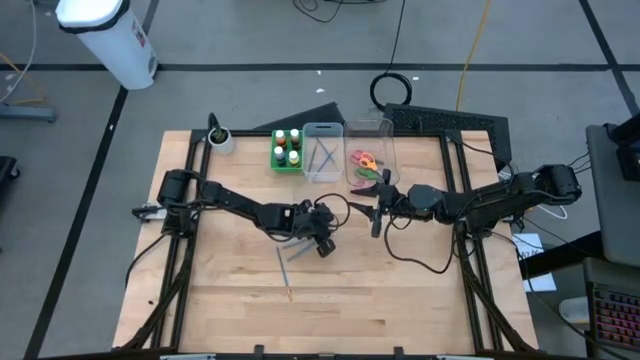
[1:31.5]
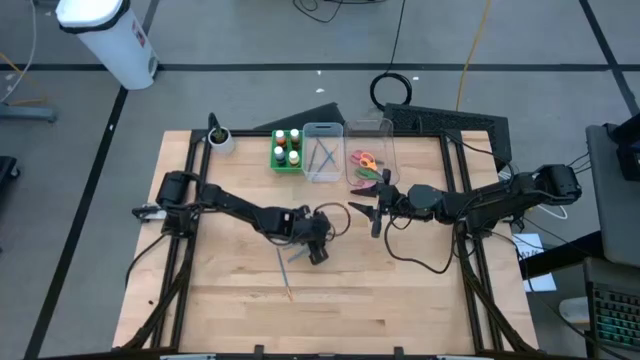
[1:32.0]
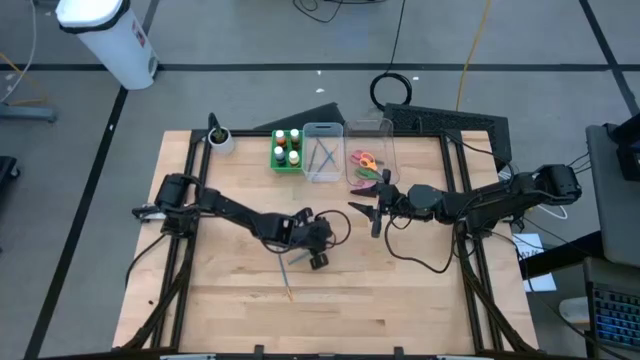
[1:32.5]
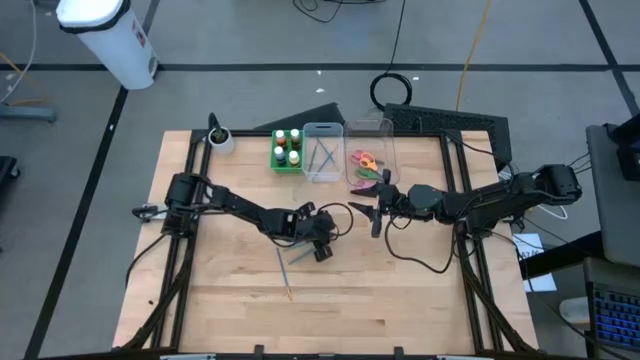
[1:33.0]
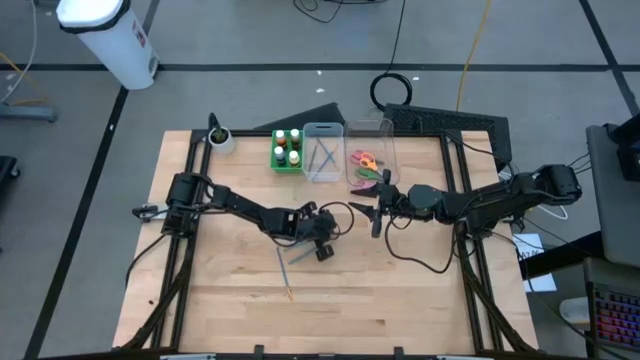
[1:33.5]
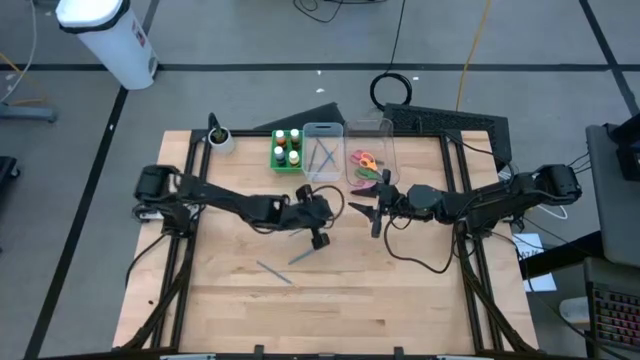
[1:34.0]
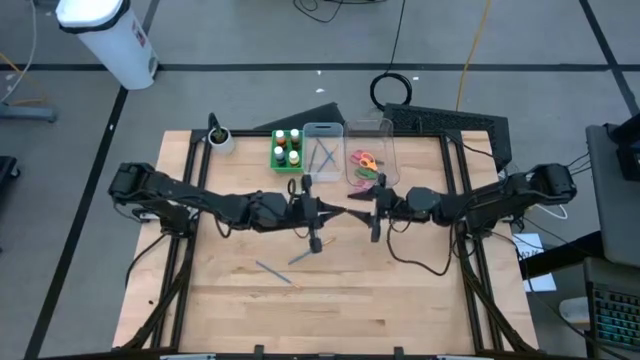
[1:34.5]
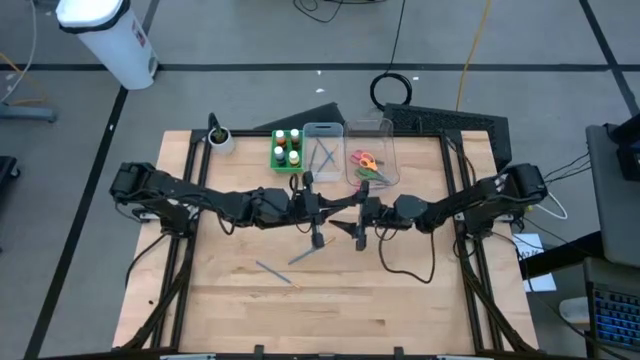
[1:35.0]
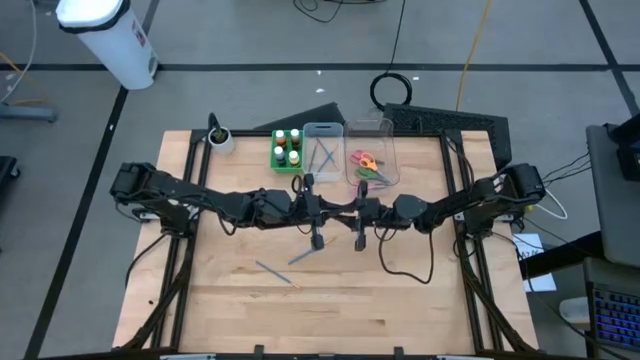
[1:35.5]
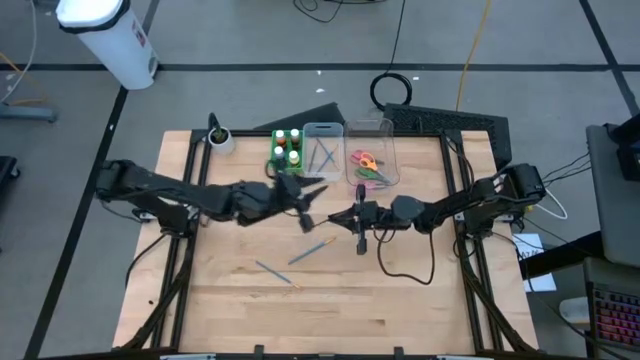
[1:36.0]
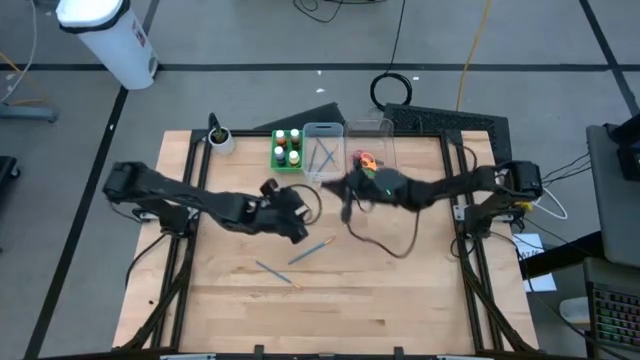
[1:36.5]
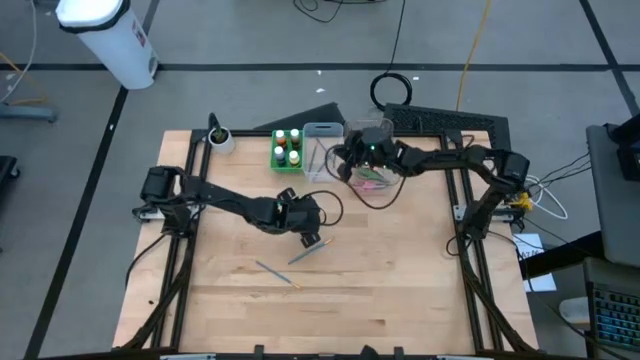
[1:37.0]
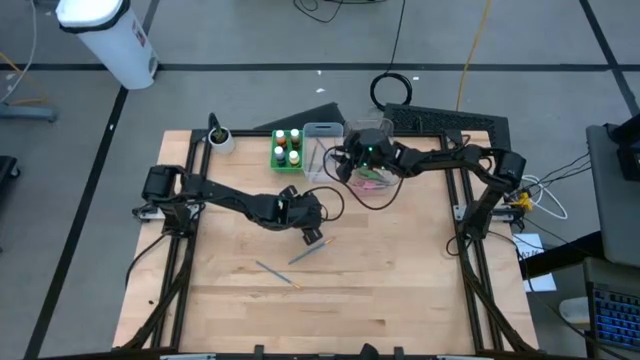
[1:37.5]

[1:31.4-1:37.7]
Task: Pick & Place Paint Supplies
Put the blue paint brush into the white bin

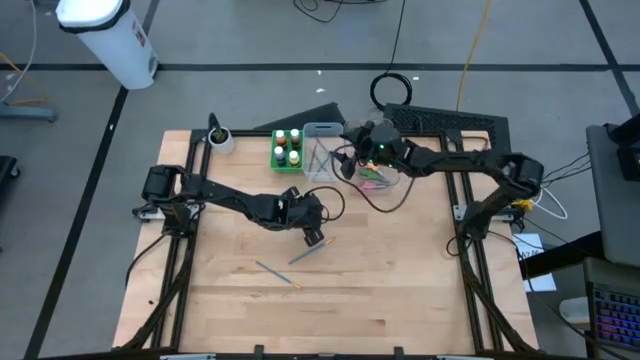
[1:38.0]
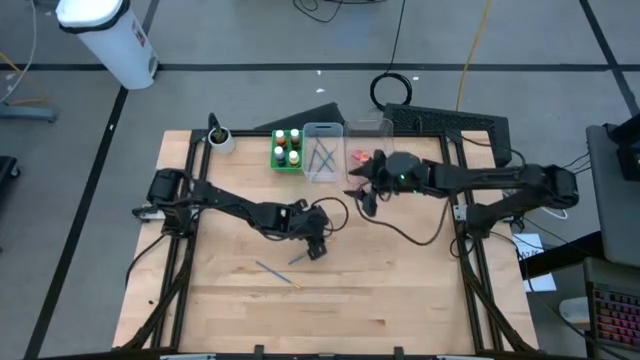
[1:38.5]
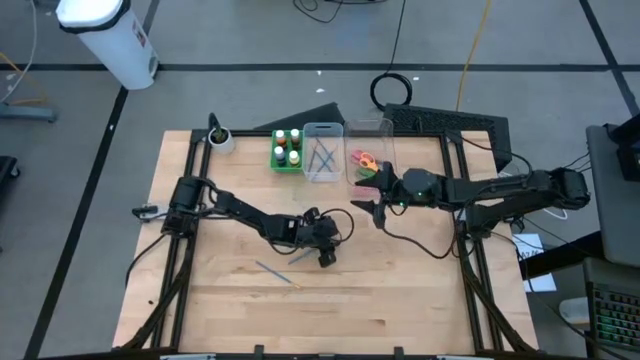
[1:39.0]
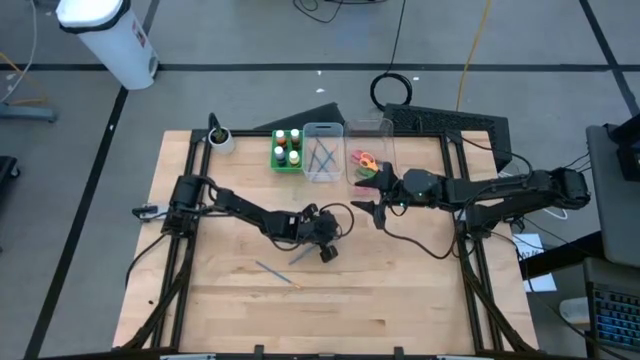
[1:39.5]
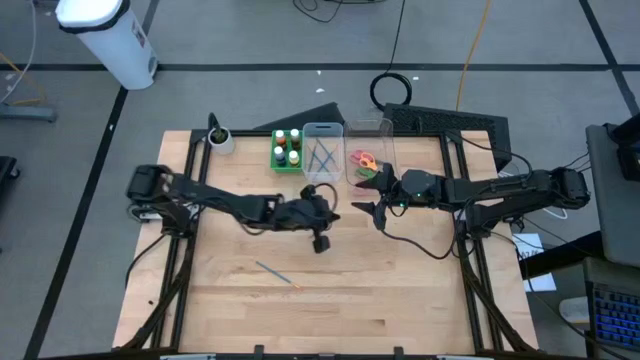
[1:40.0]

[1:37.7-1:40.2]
Put the blue paint brush into the white bin

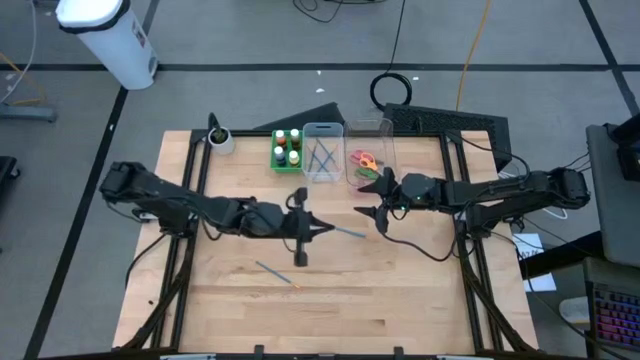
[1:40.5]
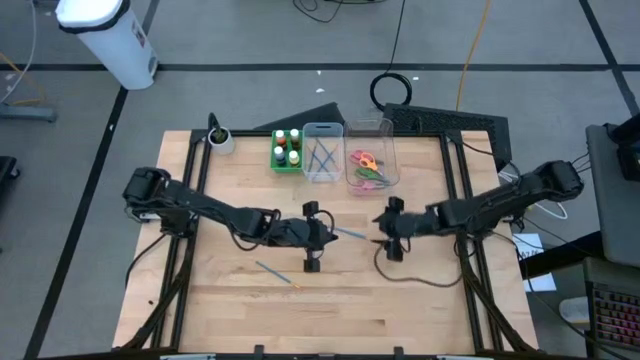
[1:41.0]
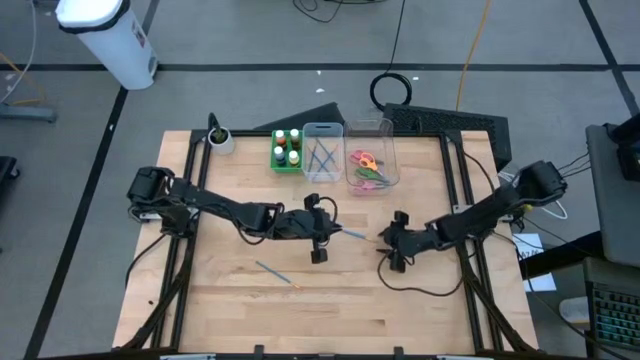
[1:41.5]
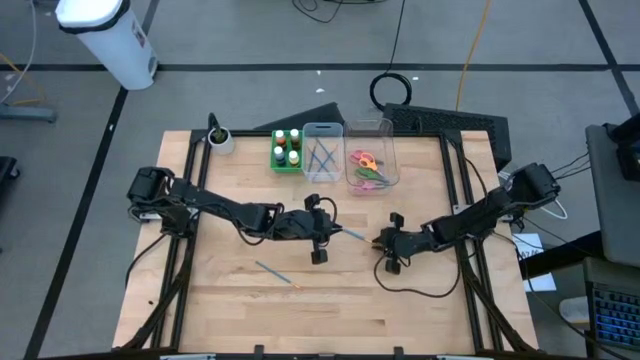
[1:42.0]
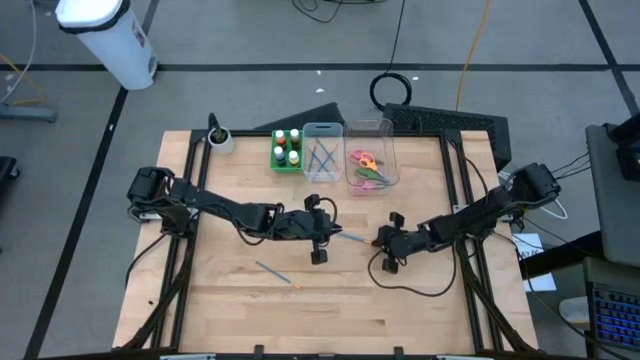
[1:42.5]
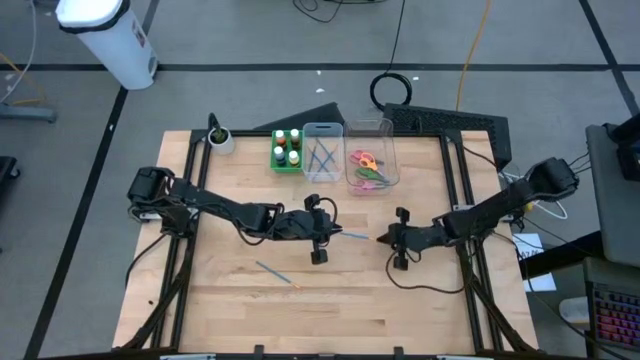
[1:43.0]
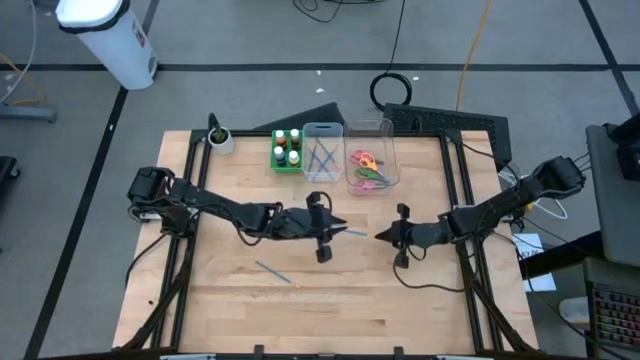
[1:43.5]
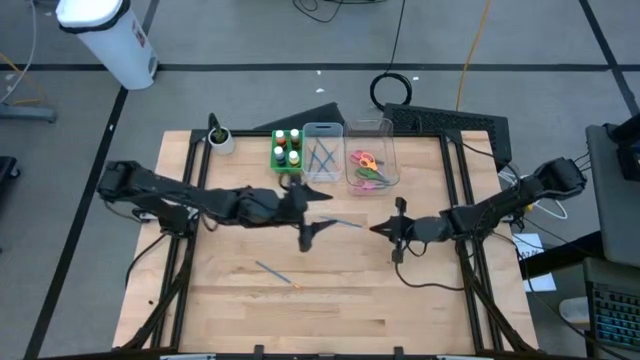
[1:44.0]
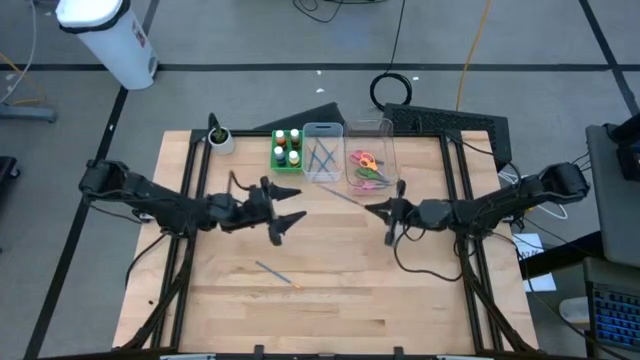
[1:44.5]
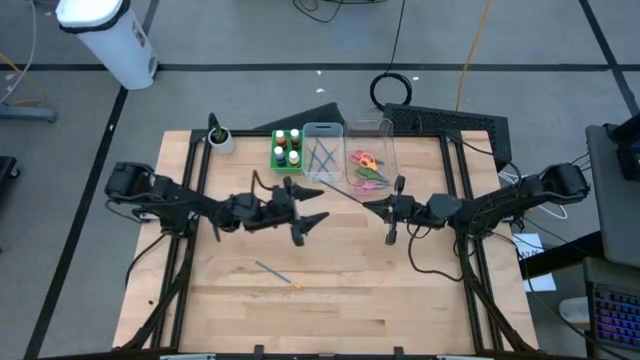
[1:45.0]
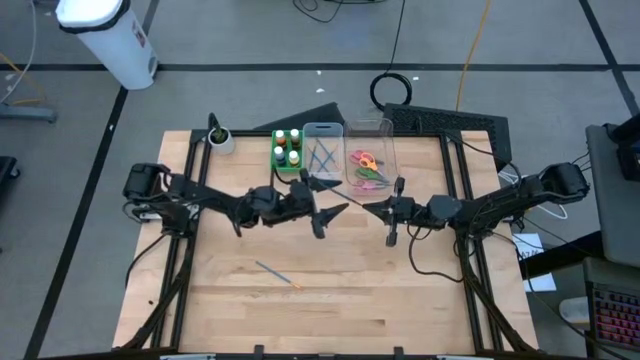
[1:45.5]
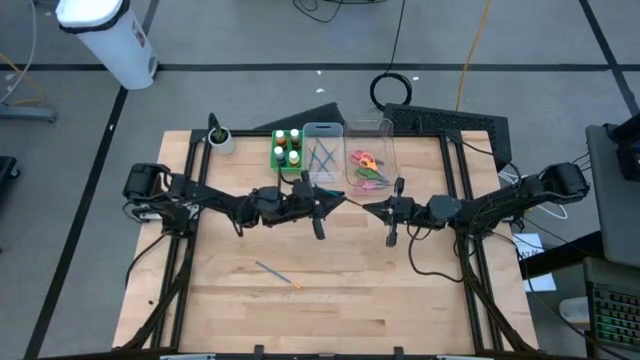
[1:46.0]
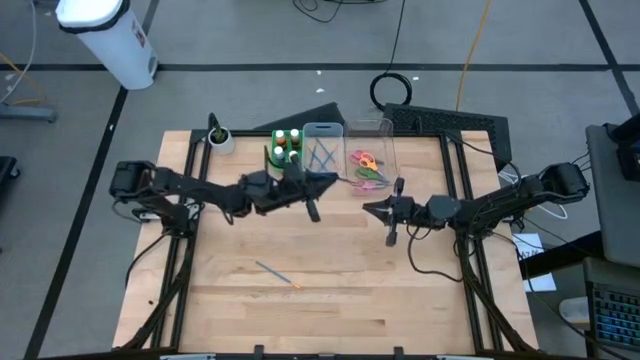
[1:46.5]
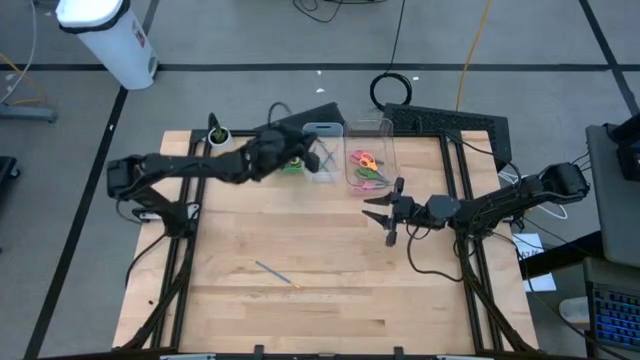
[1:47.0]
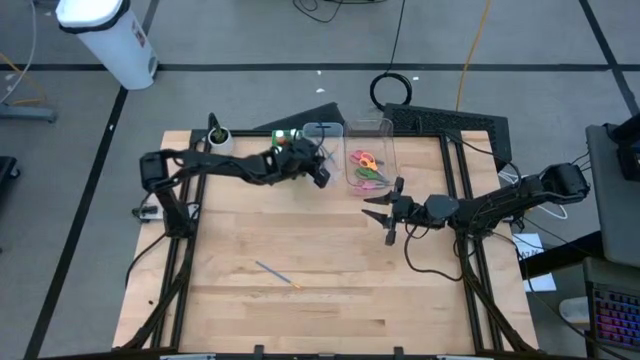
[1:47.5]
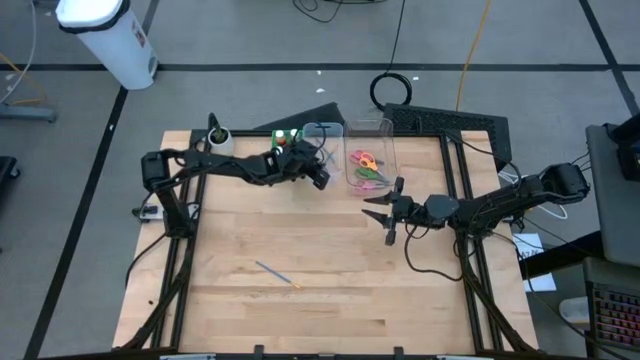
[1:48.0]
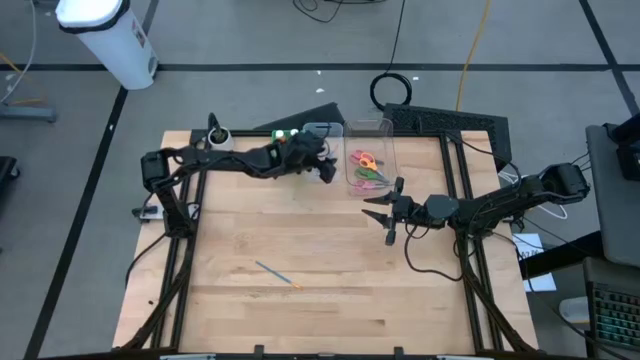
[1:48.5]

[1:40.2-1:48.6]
Put the blue paint brush into the white bin

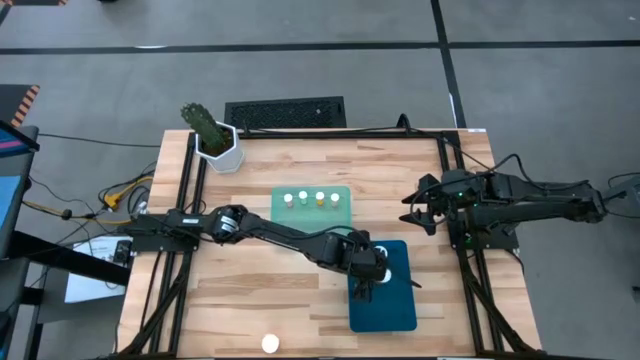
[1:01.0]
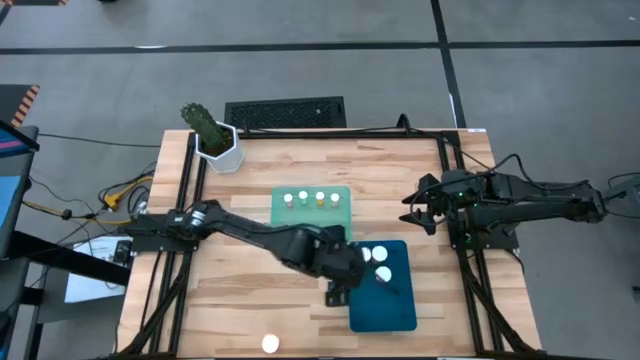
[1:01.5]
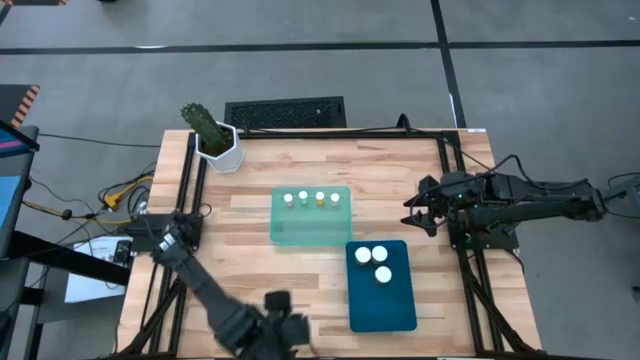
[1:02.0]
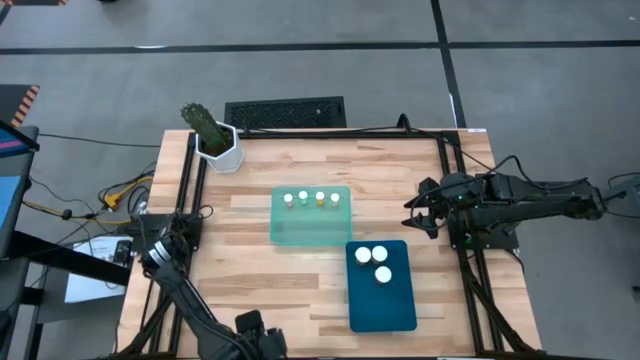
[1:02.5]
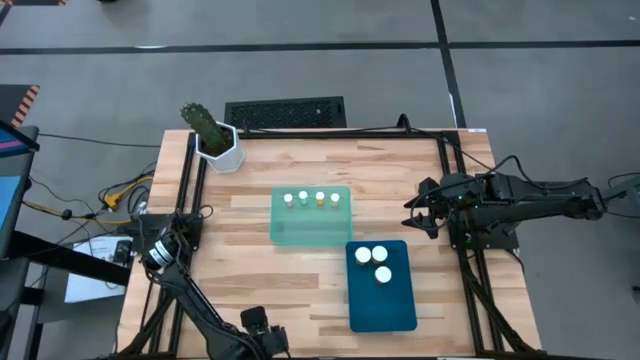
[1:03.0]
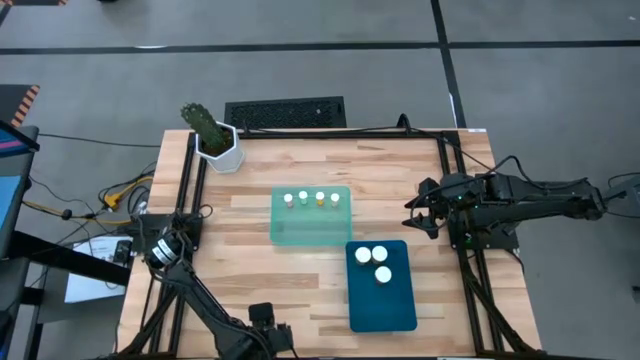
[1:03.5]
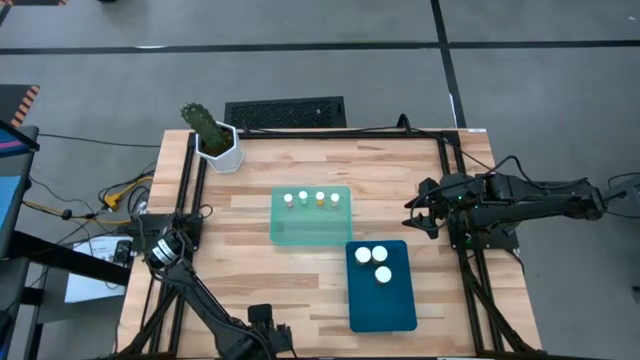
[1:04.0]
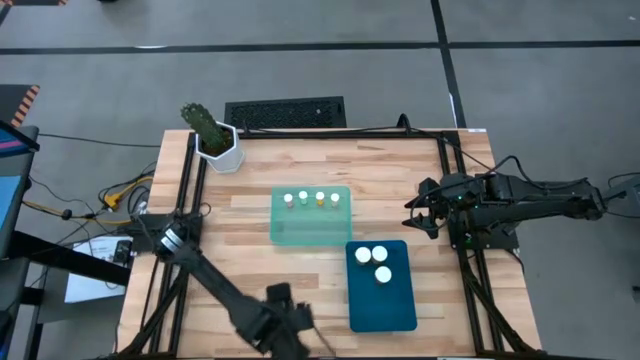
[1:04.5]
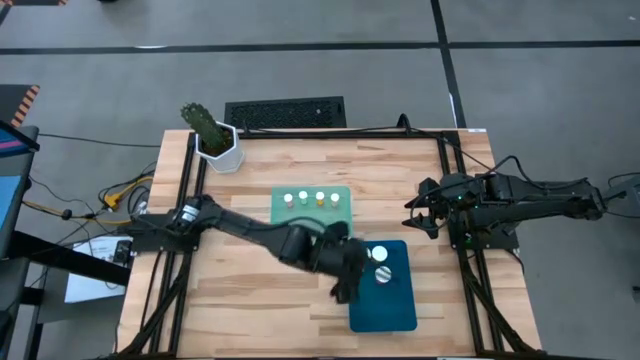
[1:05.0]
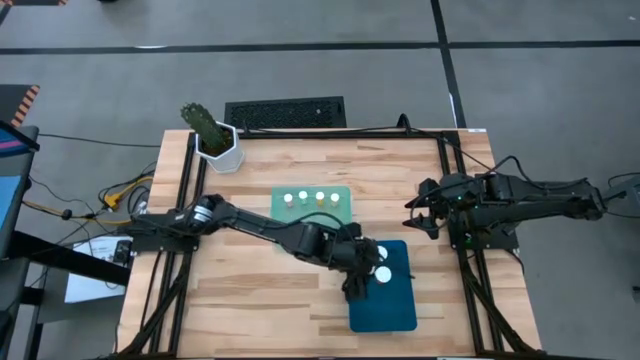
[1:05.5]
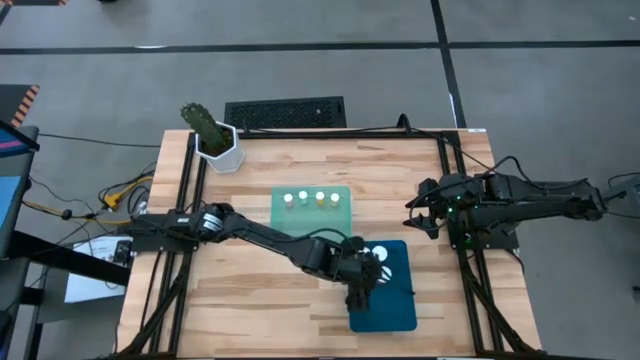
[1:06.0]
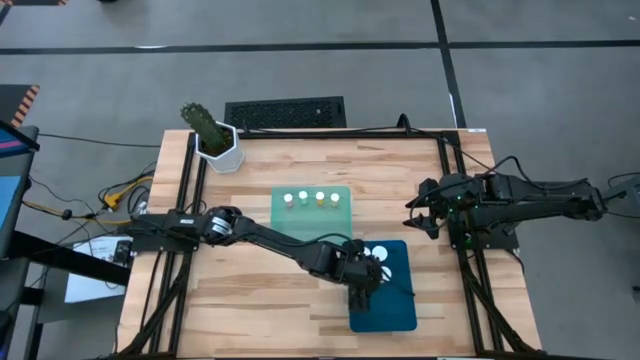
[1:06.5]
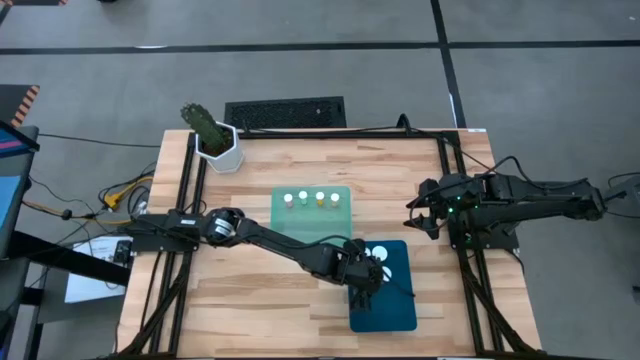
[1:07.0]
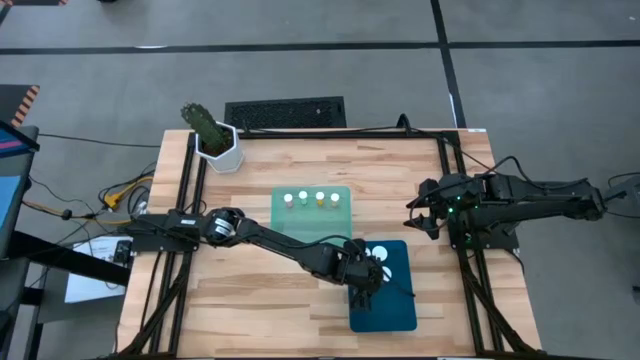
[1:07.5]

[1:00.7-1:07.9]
Task: Pick and place medicine bottles into bin by pill shape (circle, oval)
Put the large orange pill bottle into the blue bin
